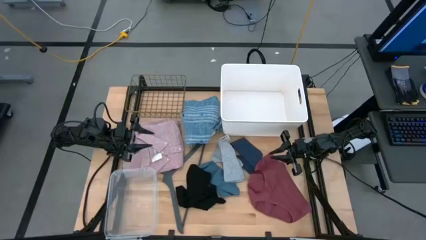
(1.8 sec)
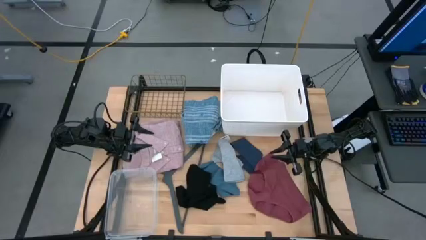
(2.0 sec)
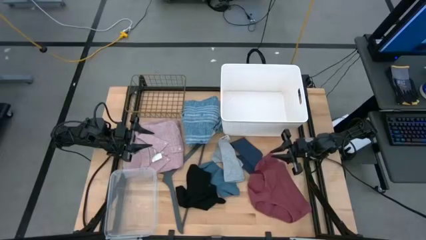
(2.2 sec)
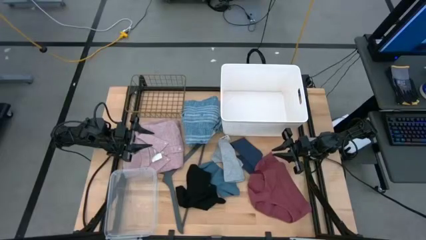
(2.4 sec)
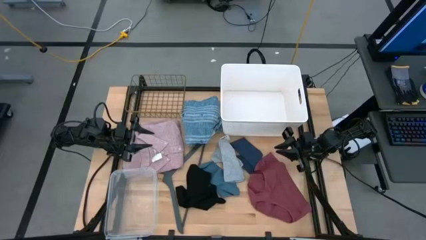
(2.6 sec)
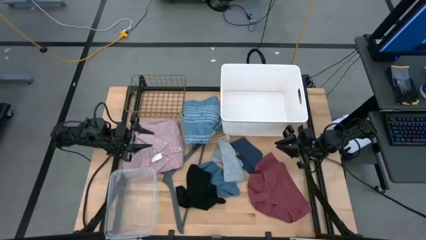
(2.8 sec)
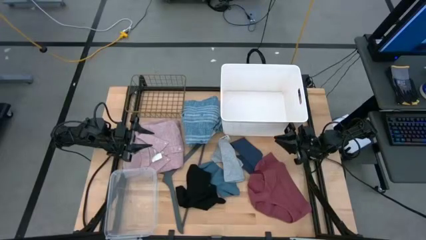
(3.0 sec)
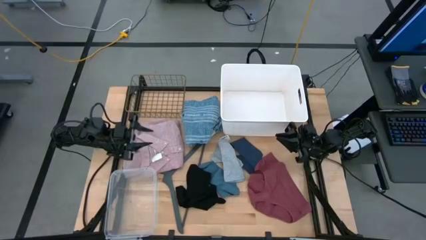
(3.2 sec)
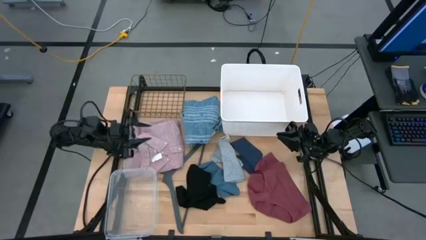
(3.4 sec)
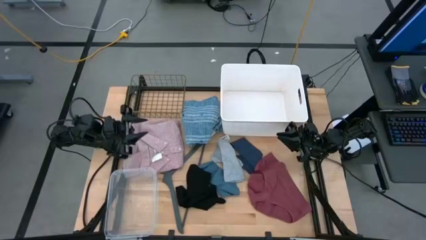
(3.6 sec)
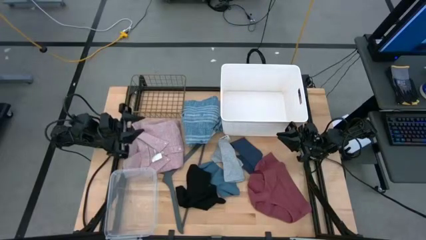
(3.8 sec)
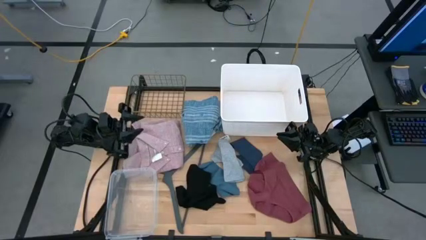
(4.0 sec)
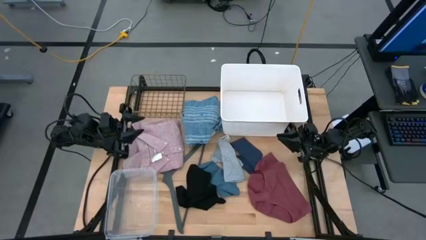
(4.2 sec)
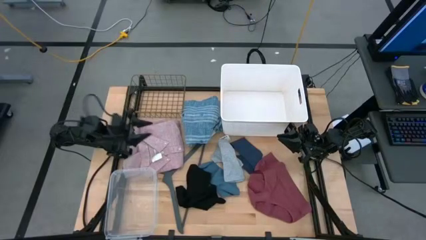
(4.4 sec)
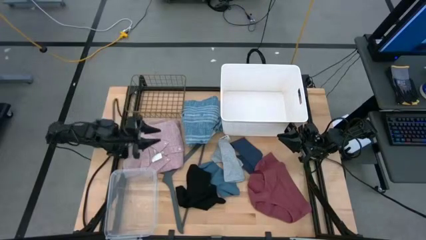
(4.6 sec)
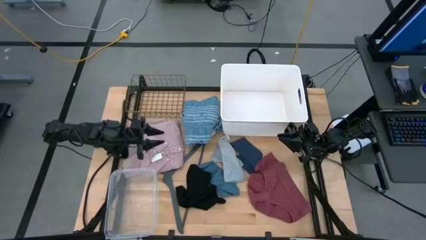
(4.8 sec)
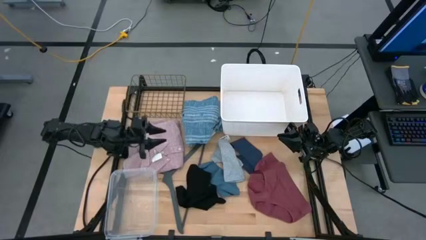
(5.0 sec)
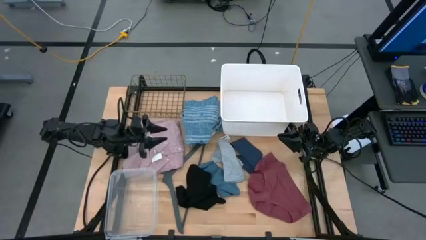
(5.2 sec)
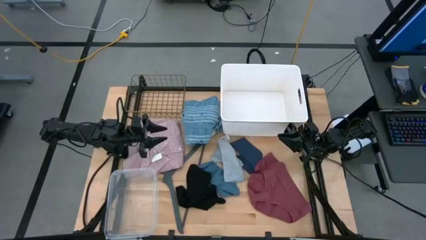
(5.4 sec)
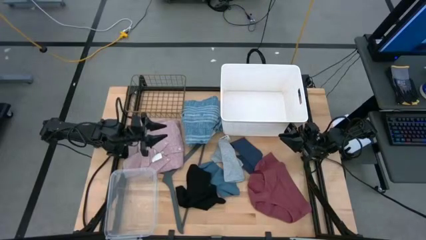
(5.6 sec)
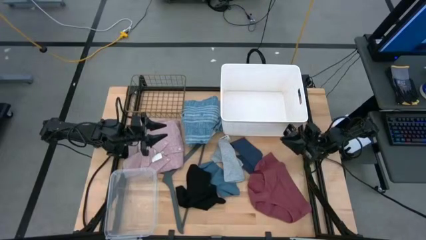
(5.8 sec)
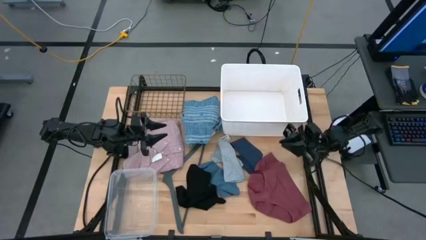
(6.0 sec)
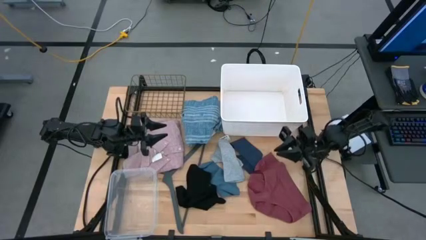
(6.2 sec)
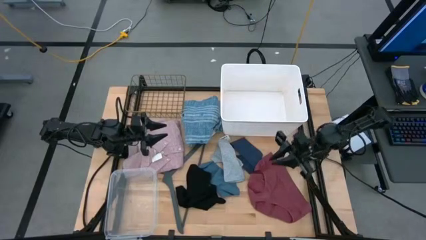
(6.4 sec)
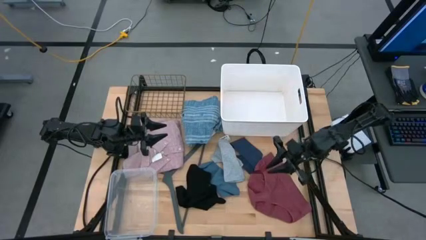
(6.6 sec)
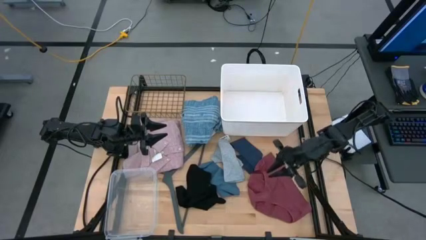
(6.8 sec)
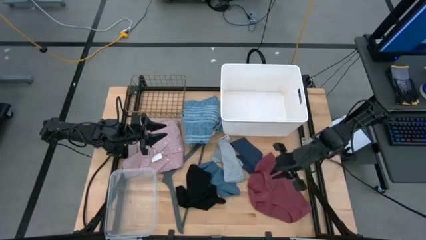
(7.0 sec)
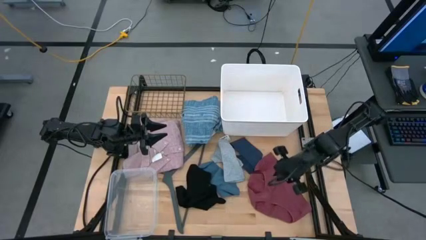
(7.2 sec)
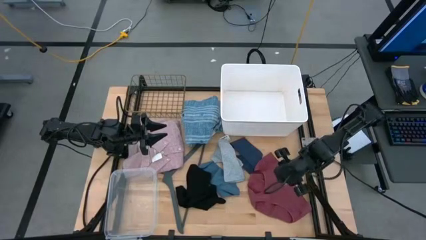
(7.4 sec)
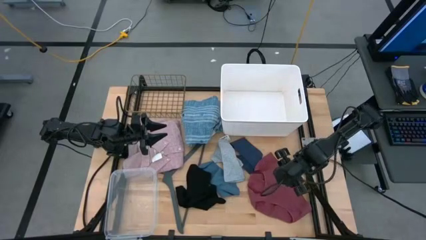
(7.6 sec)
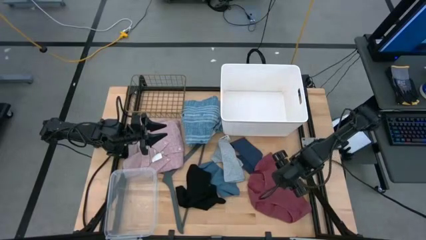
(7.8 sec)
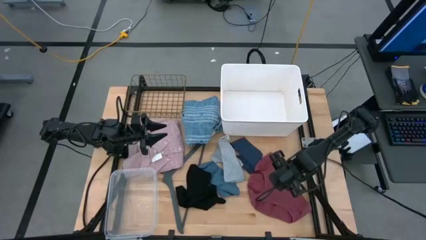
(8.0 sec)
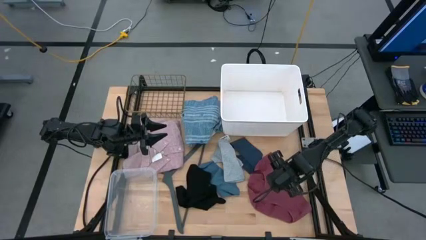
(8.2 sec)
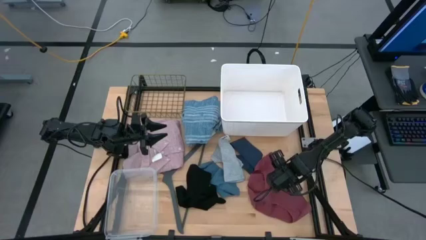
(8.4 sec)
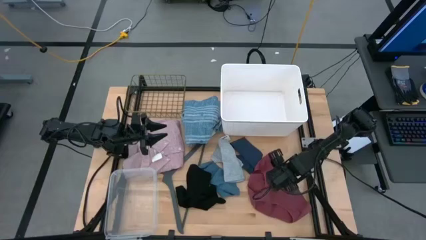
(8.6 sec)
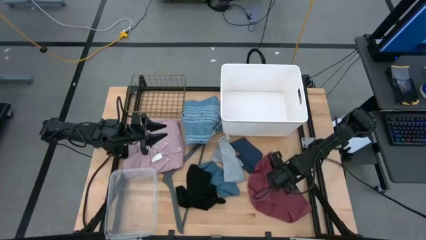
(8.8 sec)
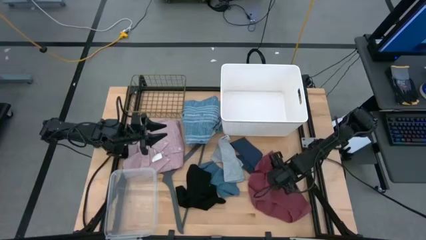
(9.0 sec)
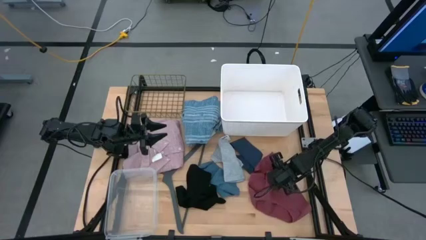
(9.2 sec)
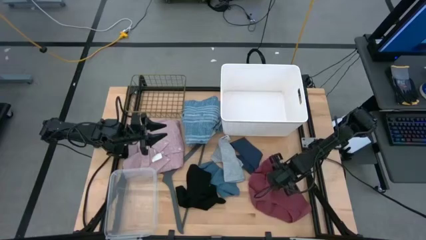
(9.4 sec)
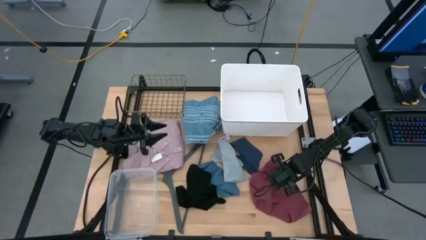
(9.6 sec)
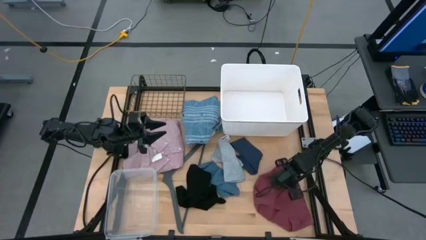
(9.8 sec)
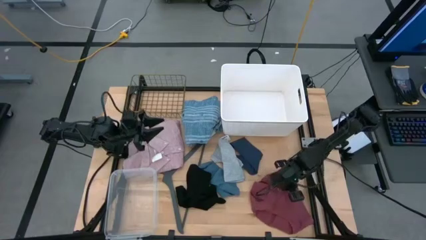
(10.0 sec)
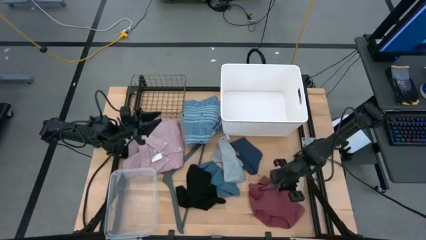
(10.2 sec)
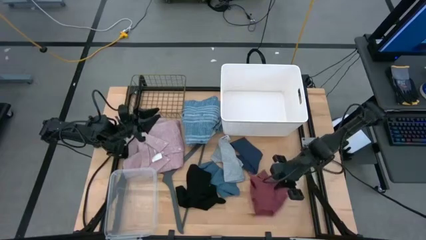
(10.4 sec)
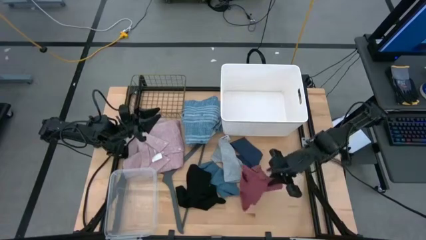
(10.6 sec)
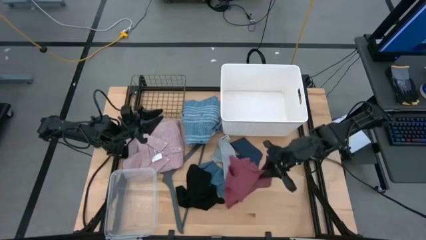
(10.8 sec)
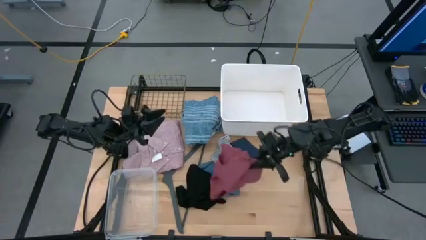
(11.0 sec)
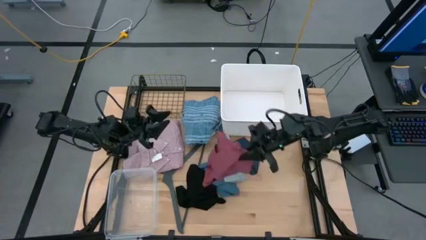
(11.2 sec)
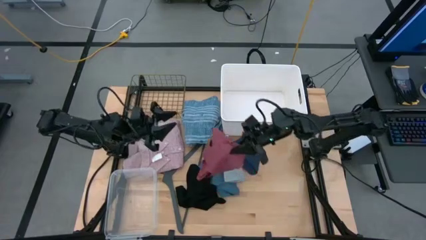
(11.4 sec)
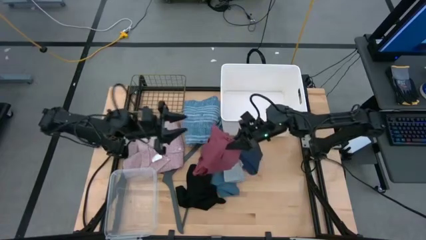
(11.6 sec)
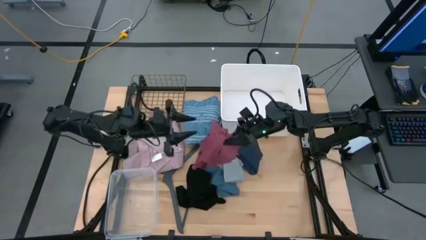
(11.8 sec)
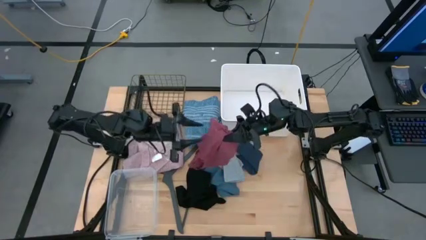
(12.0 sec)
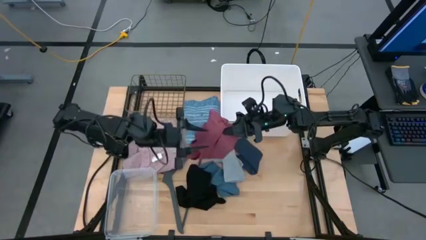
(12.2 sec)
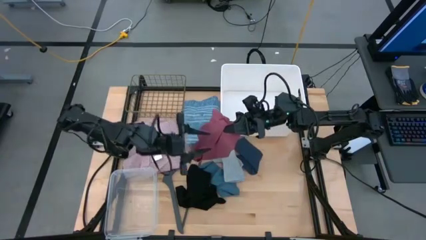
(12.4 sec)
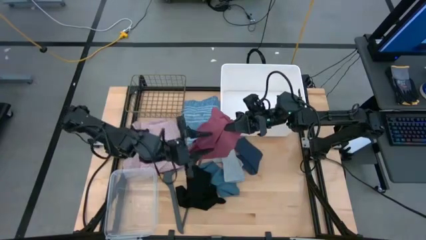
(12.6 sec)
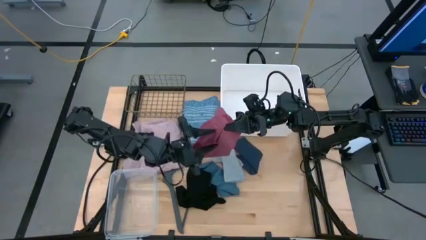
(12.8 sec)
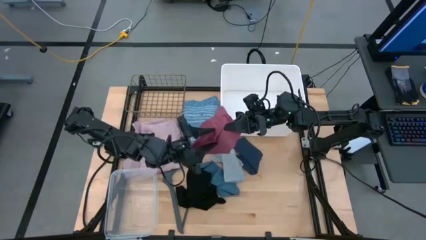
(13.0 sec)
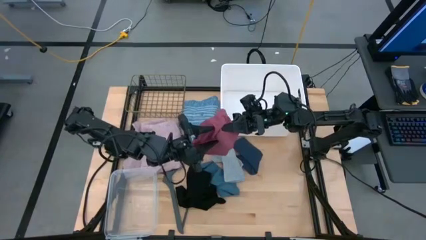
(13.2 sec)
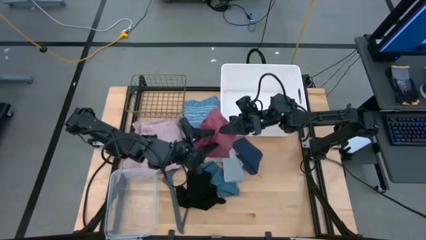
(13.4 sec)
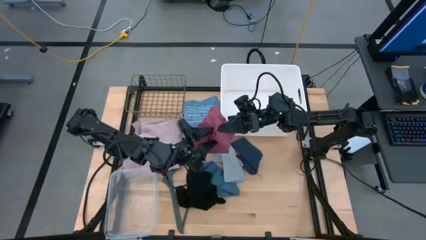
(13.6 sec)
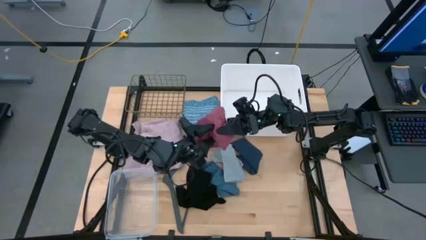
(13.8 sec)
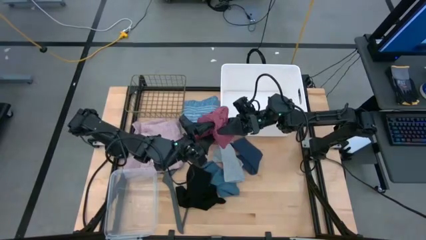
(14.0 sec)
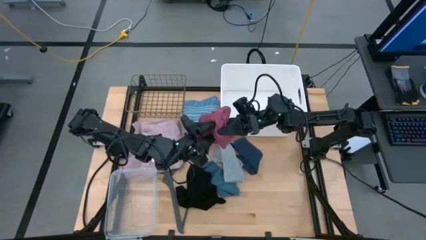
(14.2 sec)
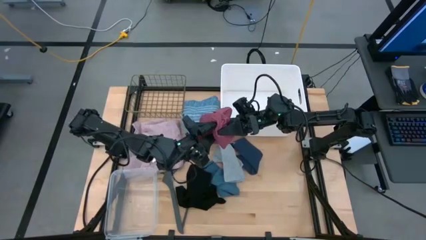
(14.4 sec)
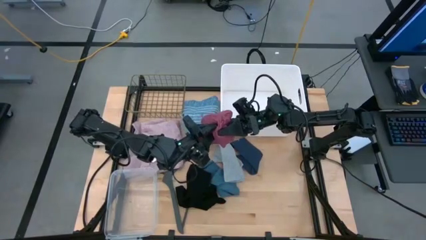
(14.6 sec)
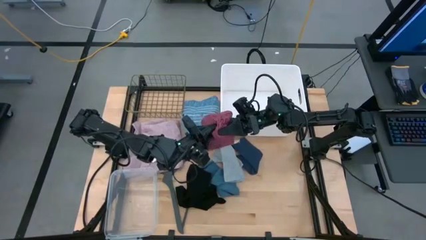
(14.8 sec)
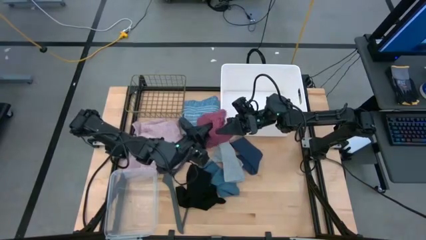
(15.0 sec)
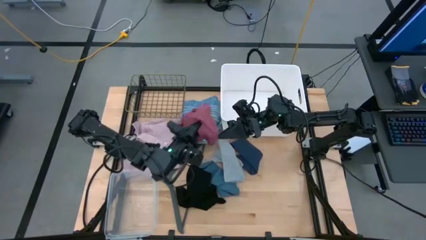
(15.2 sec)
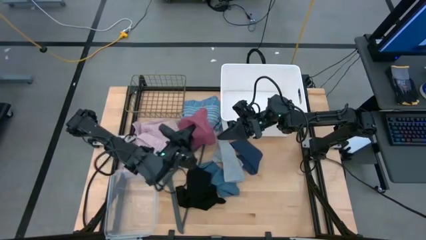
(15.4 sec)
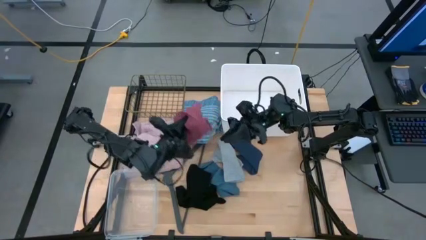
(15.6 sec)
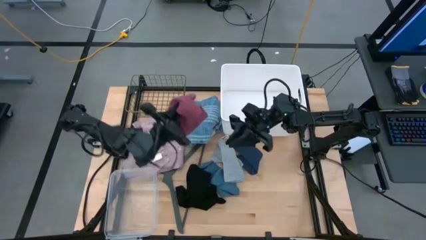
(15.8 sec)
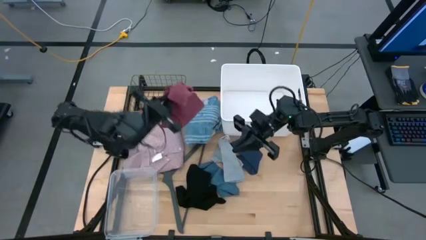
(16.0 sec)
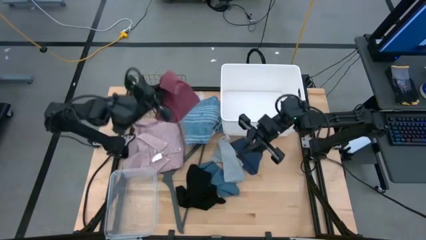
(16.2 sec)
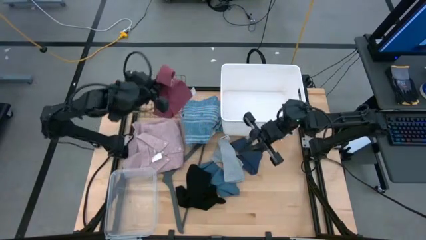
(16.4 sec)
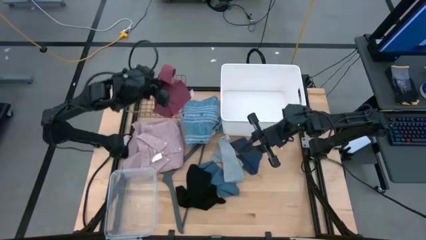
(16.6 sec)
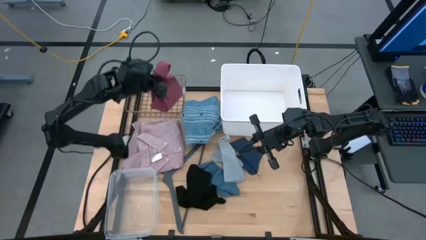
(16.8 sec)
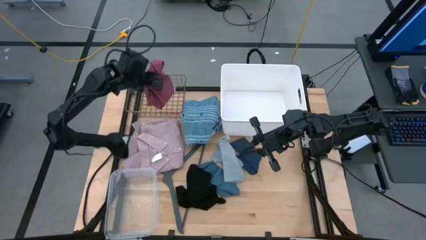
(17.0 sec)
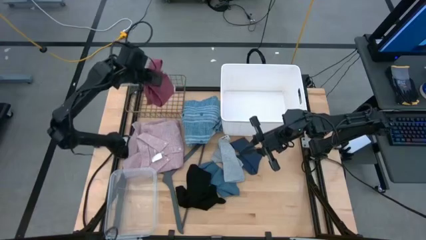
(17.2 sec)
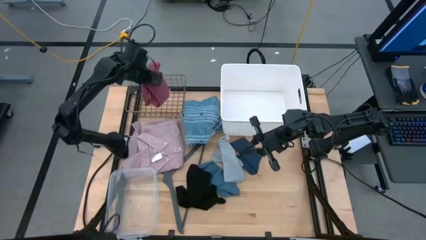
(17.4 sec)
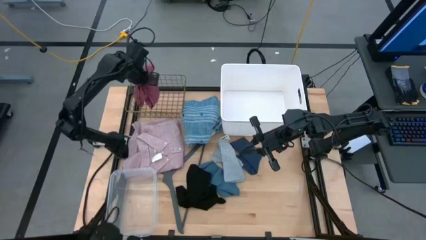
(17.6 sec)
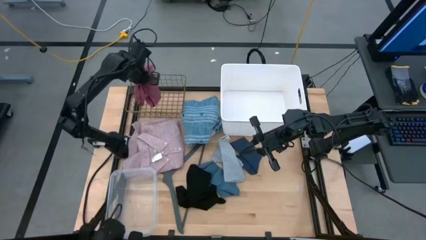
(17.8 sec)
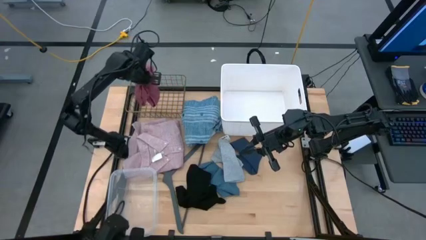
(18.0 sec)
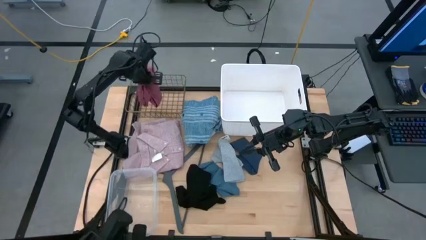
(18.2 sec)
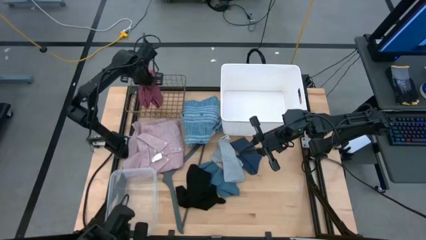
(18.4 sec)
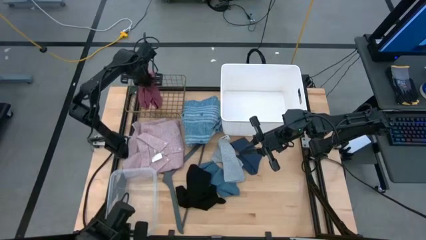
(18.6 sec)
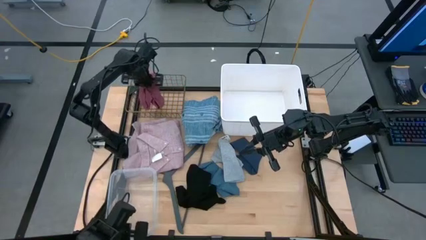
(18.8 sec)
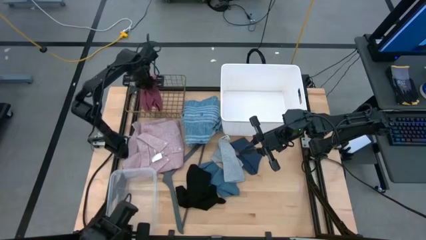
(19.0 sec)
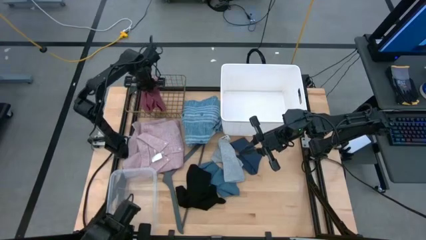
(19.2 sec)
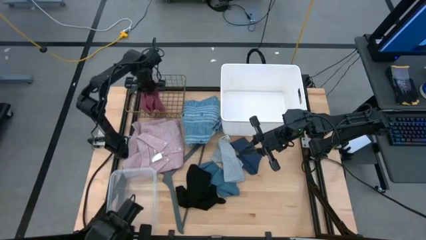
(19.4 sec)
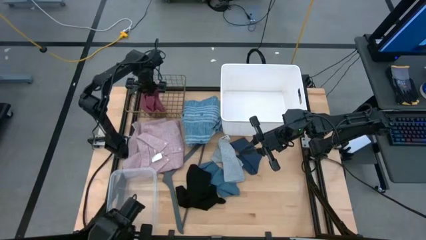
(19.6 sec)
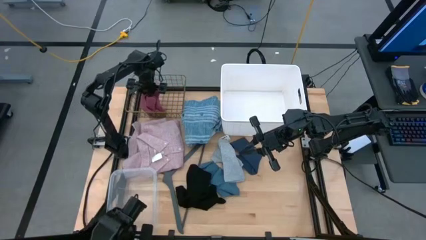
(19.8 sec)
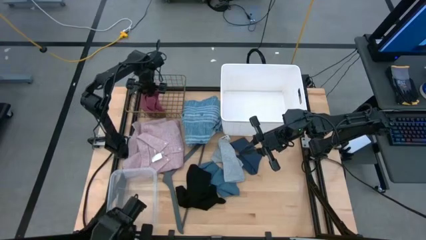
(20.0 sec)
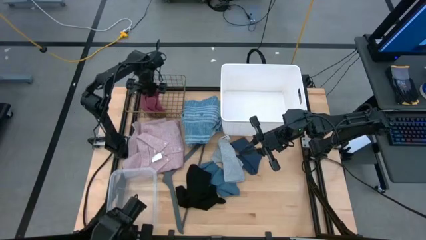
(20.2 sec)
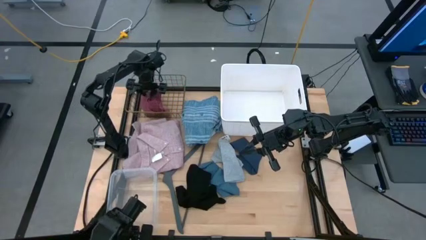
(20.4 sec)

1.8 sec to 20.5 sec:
Task: Pick & Place Cloths
Put the red undergarment into the gold wire basket
